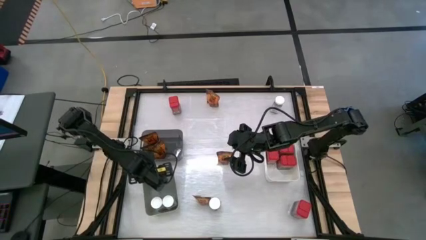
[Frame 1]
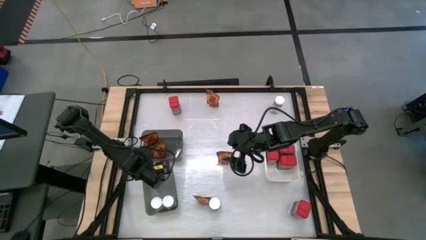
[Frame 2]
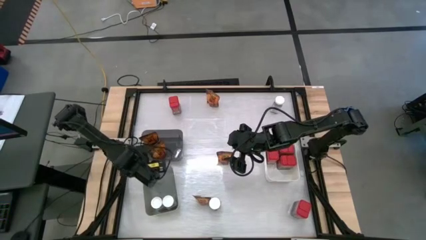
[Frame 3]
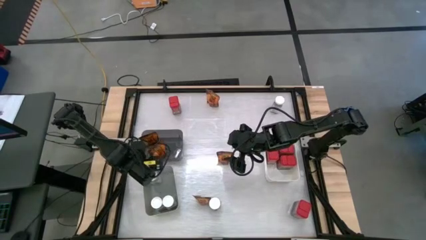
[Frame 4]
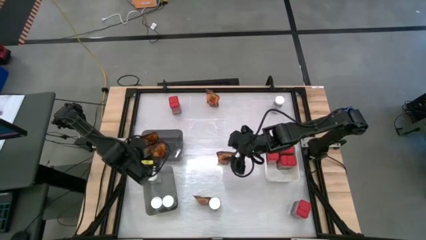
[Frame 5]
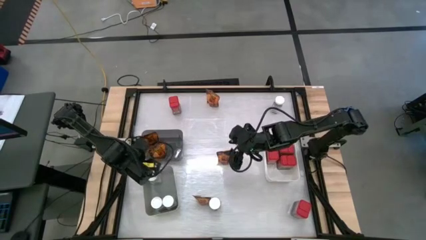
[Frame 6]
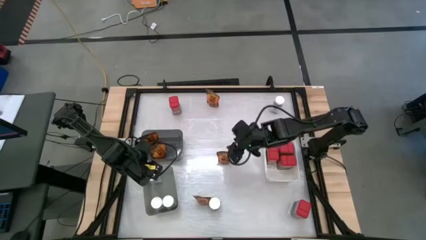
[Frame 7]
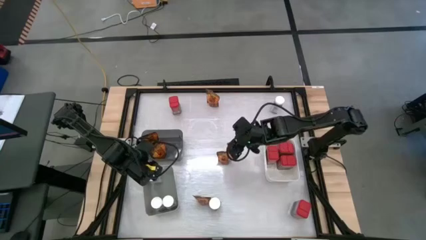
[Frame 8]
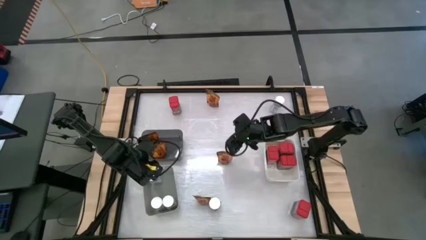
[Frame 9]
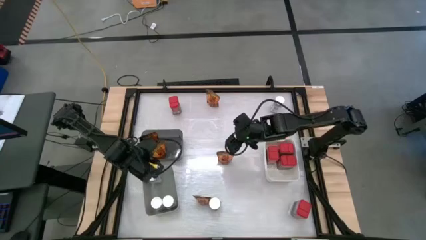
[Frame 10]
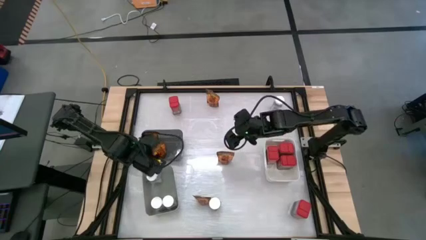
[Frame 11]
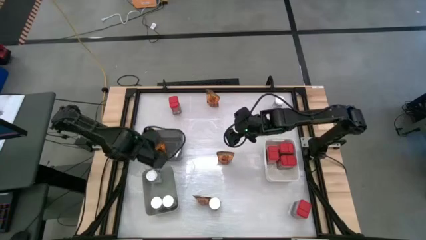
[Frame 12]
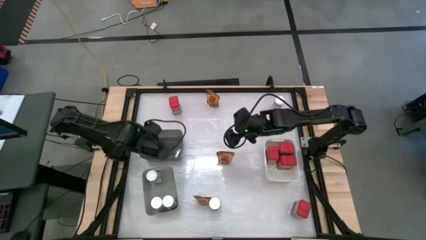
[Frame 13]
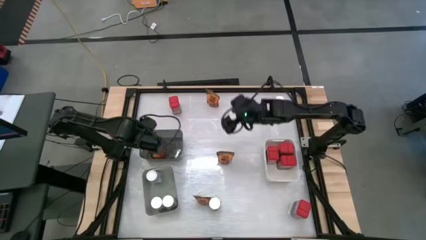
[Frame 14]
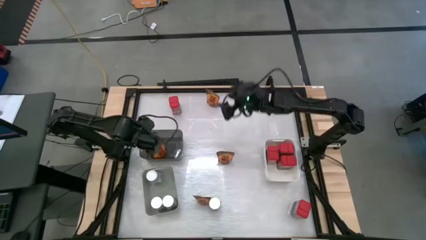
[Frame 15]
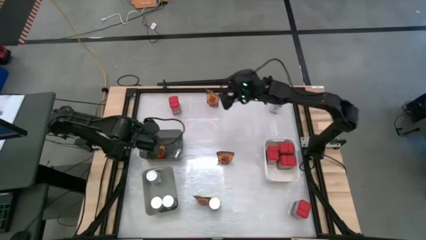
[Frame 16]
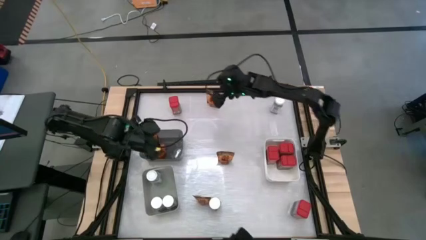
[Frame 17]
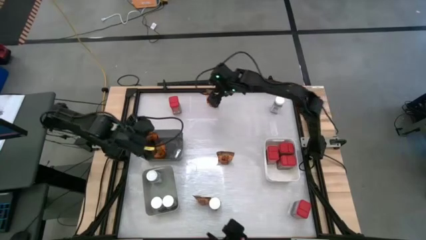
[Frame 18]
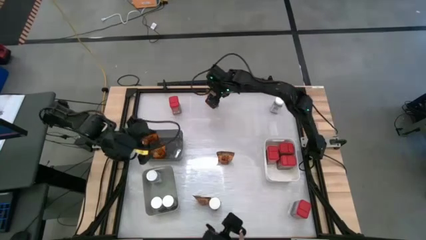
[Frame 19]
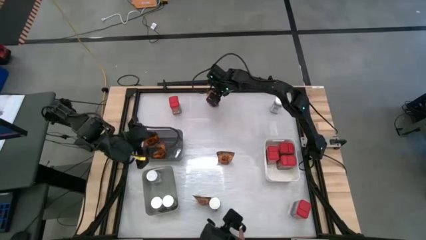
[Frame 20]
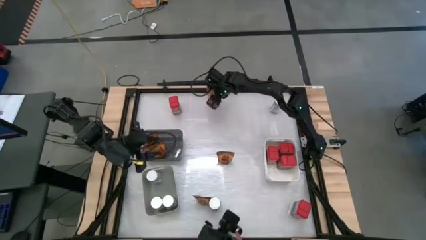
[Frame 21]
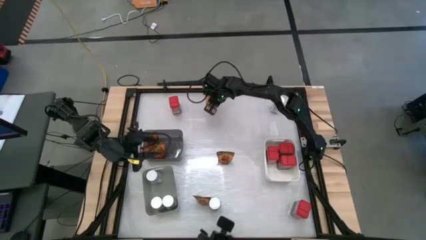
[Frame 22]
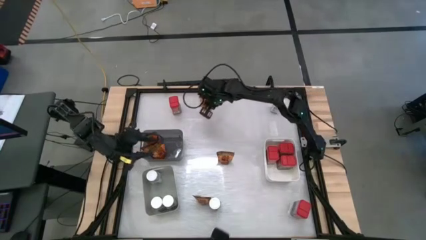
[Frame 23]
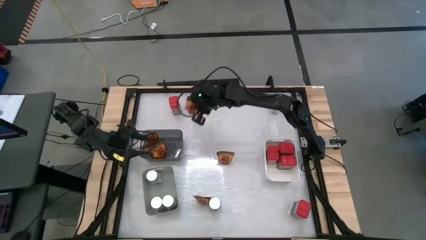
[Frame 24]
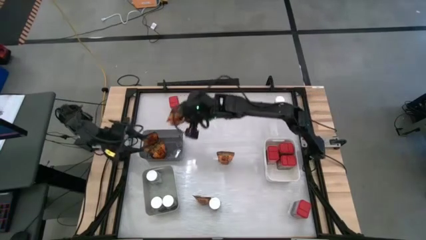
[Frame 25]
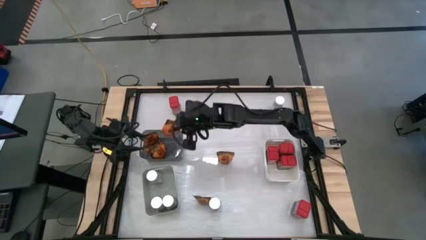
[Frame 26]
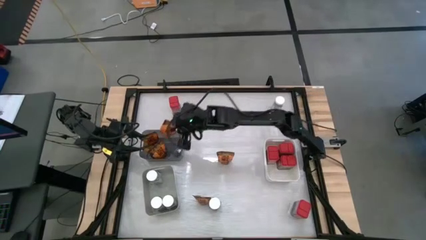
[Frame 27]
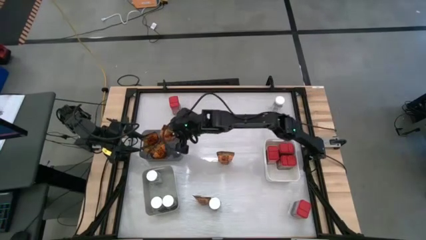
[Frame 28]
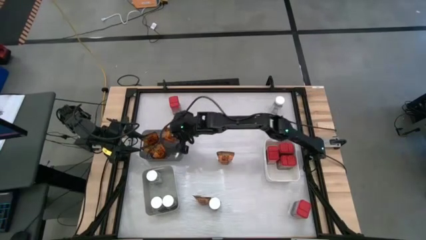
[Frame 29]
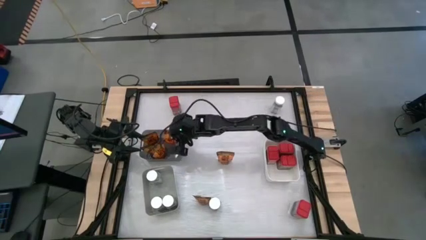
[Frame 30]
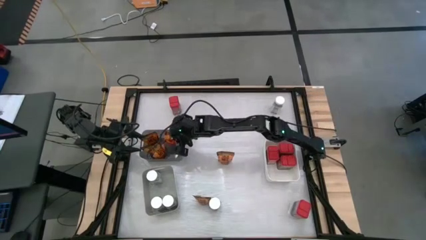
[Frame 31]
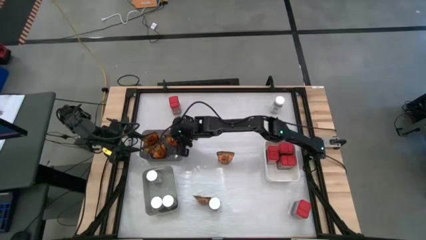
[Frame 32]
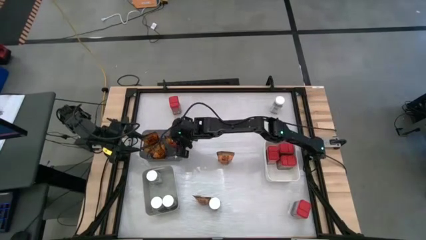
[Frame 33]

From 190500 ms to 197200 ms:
Task: Sort spices by type
Put the orange spice pack into the black bin
